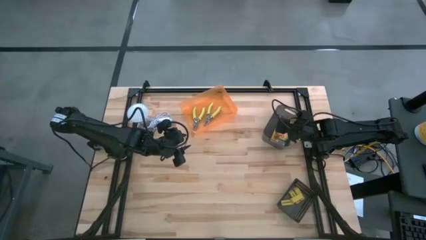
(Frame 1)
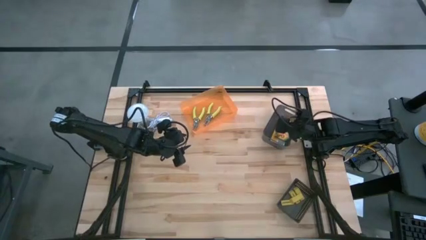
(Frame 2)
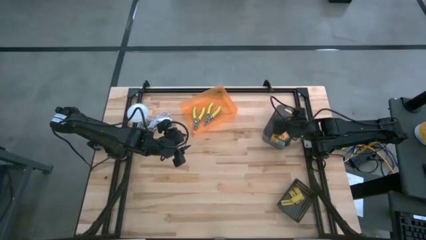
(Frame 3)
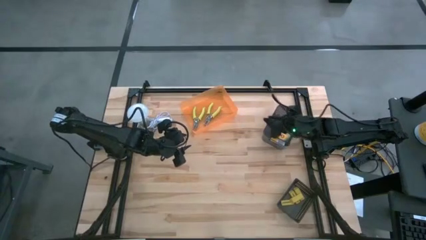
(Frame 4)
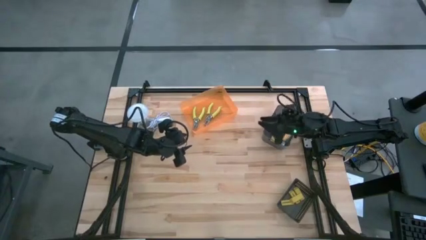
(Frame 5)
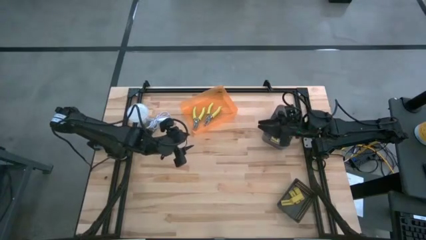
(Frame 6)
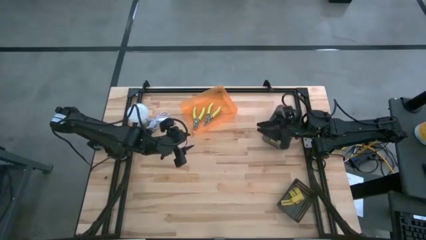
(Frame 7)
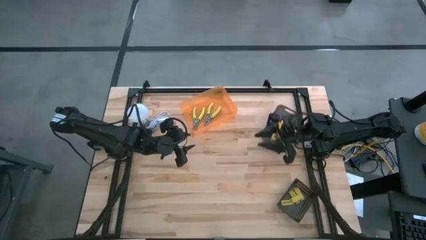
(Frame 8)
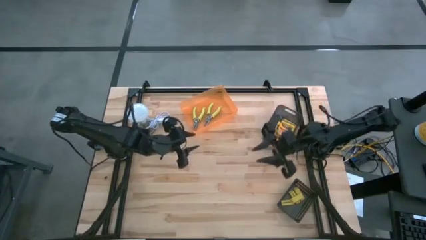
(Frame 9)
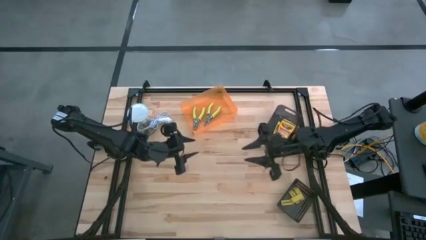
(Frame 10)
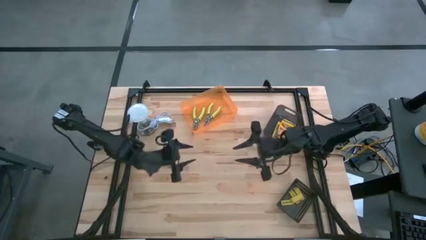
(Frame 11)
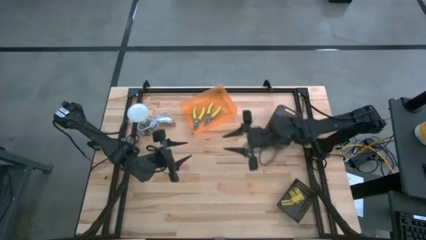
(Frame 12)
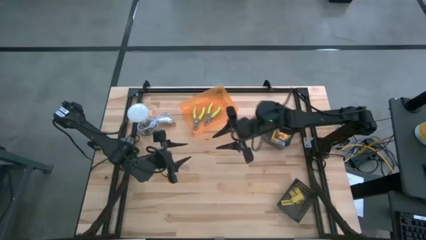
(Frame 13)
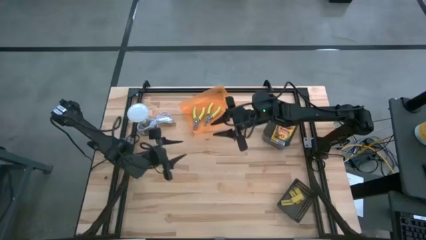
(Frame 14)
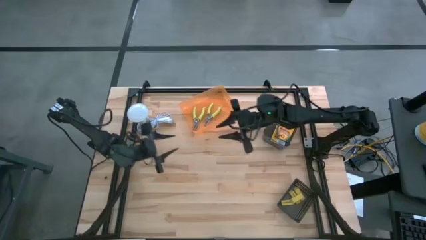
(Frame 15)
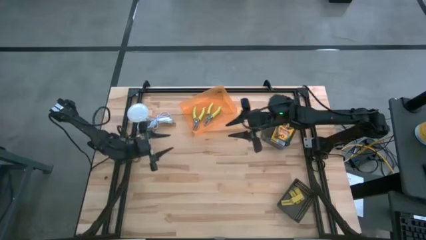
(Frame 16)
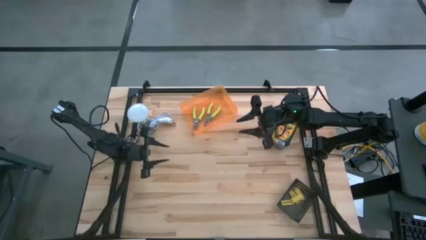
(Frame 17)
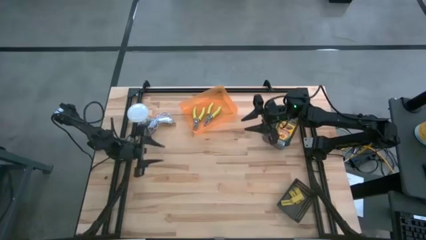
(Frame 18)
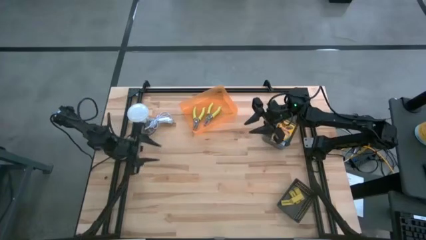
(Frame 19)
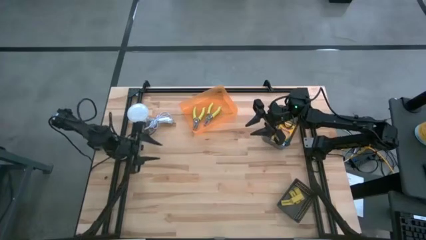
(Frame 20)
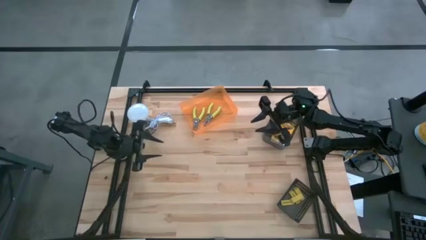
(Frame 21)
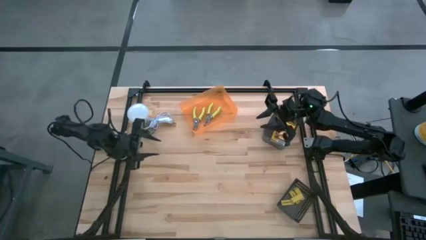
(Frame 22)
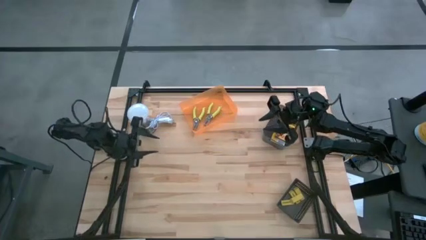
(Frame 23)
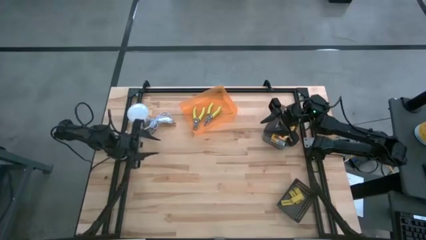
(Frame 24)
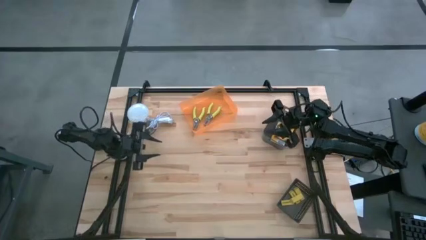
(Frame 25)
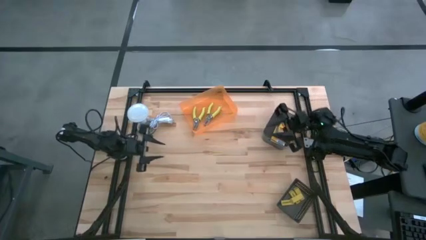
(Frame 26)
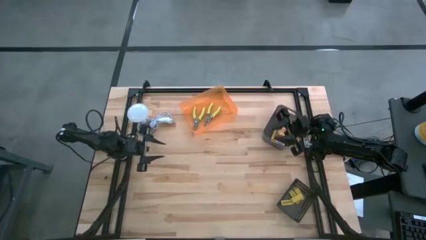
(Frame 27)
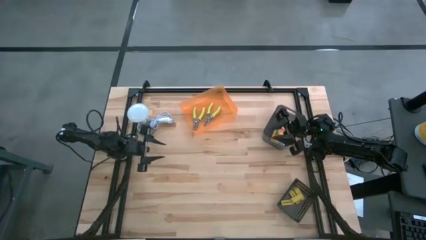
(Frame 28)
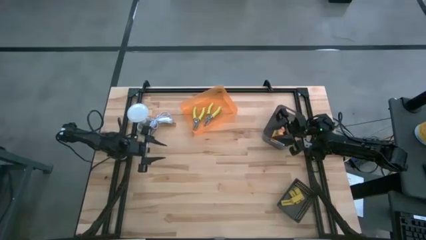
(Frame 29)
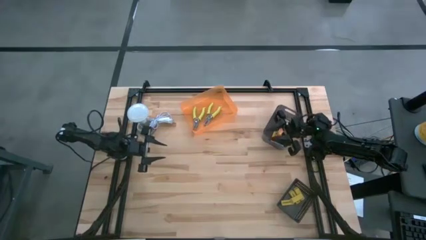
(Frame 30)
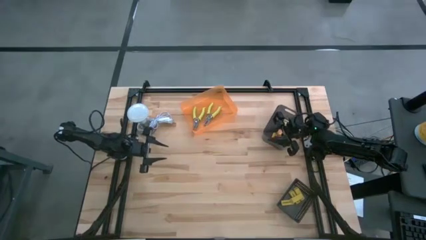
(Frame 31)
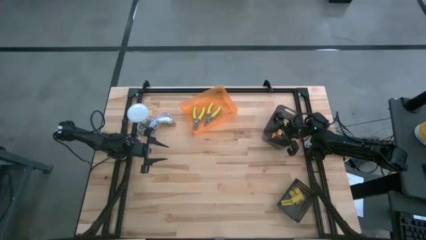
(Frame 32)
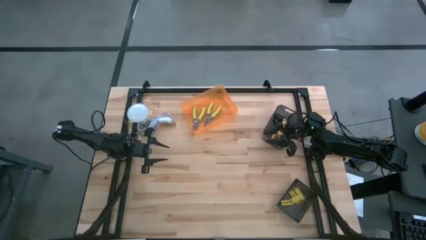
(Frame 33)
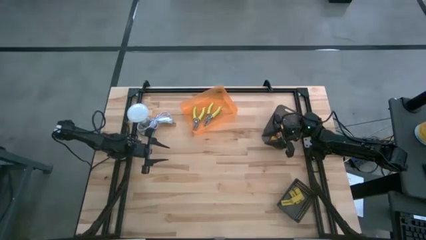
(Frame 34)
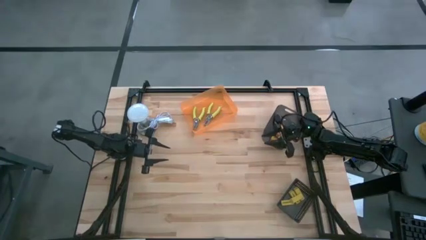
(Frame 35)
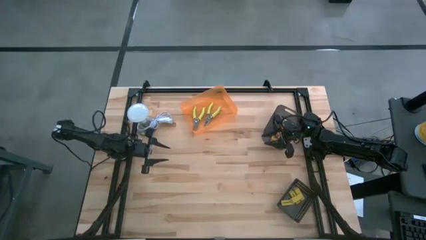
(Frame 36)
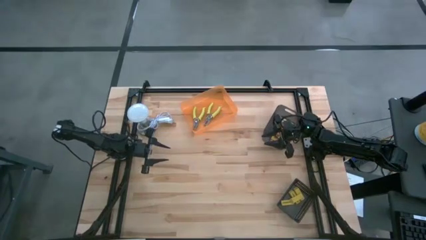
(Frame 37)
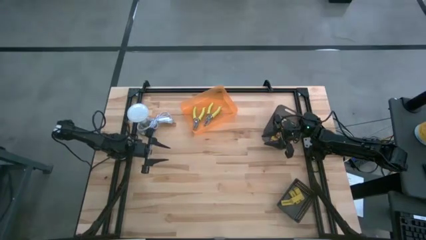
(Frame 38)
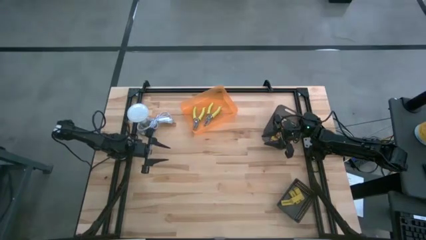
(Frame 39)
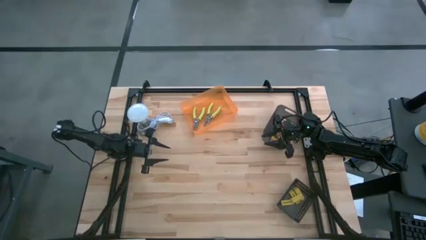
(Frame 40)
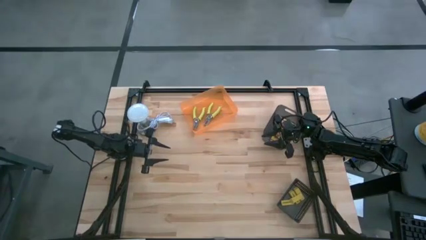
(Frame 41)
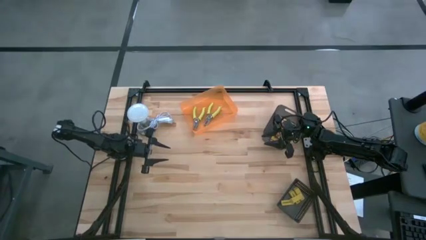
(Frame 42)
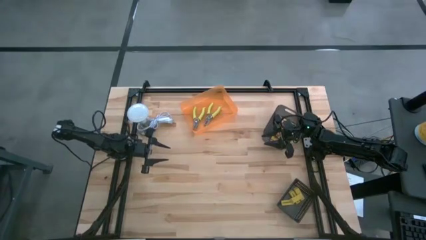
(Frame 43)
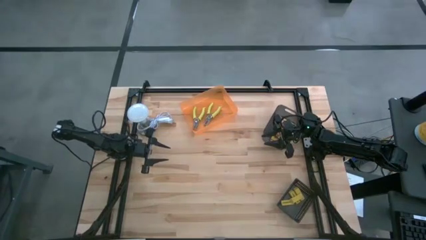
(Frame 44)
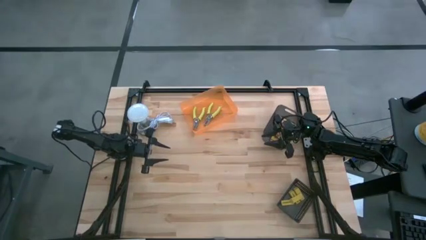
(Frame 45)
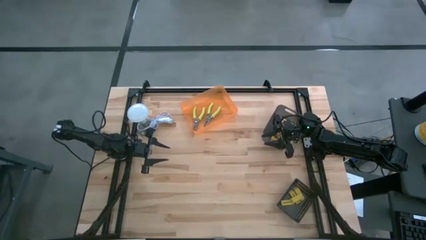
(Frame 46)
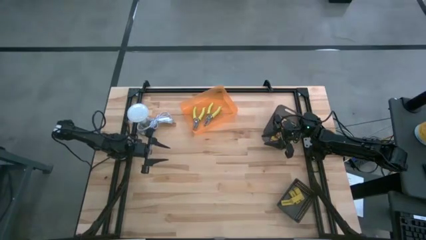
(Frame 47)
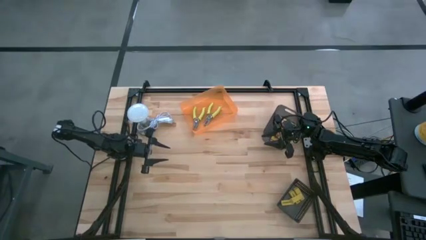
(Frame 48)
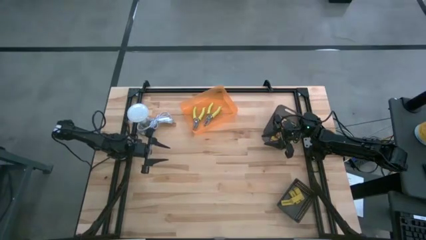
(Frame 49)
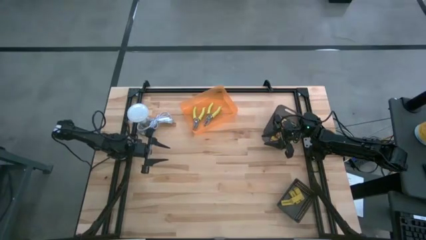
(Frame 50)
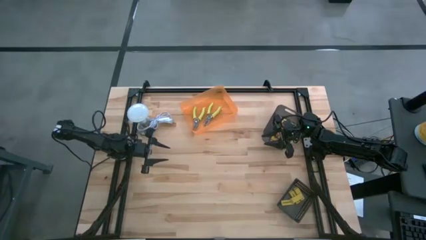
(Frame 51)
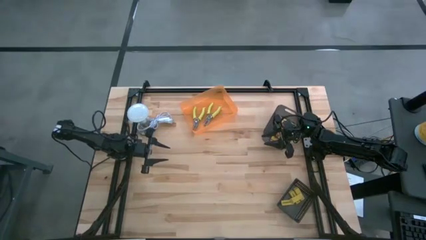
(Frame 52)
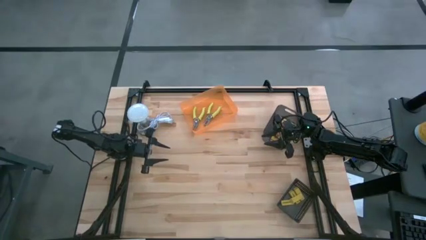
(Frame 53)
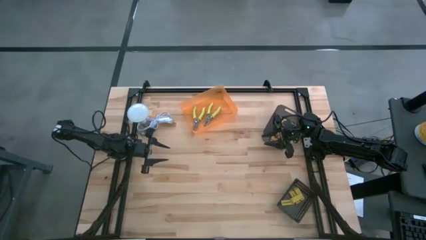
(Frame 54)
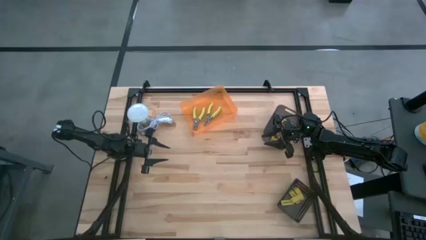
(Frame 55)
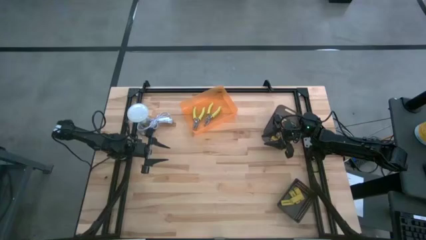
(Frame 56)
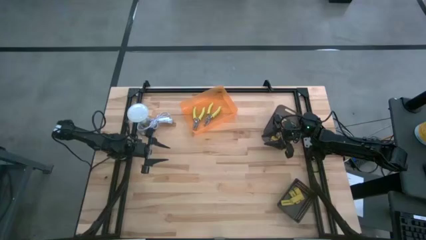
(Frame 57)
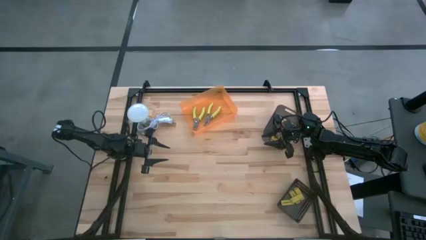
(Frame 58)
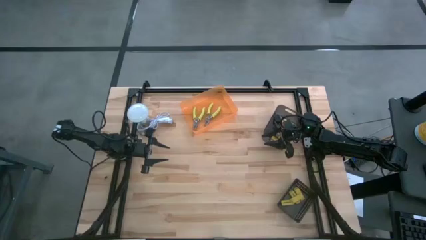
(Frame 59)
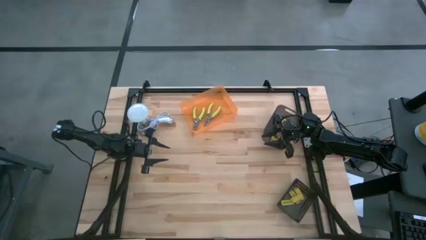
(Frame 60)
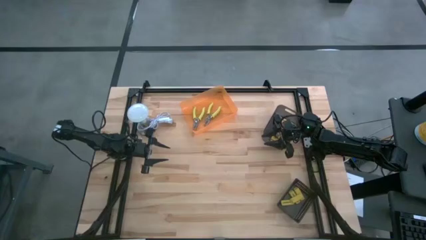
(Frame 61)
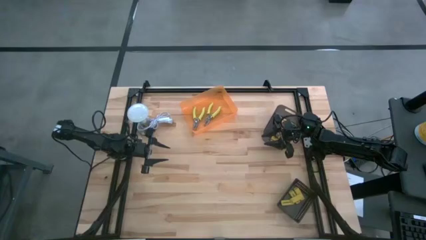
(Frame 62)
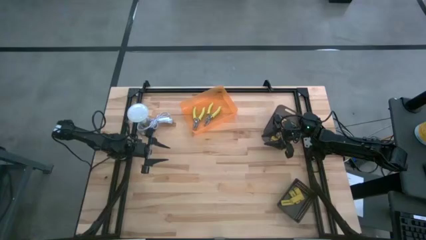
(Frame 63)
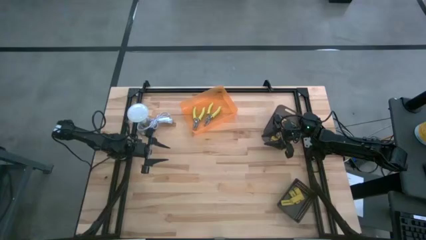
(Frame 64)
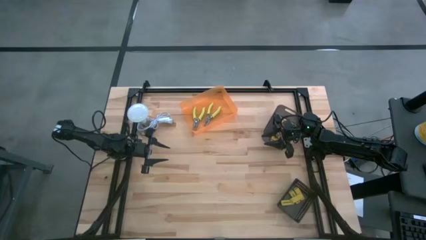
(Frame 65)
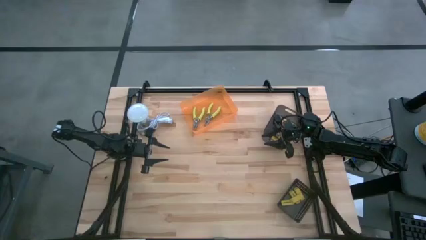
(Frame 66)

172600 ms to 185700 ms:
Task: Pick & Place School Supplies
Return to Home Position

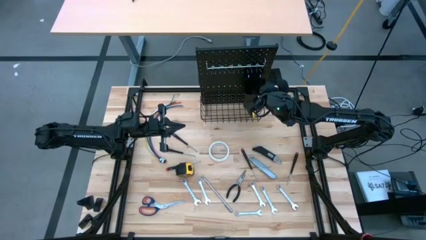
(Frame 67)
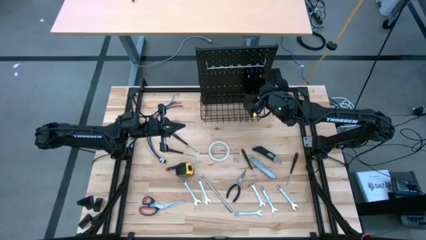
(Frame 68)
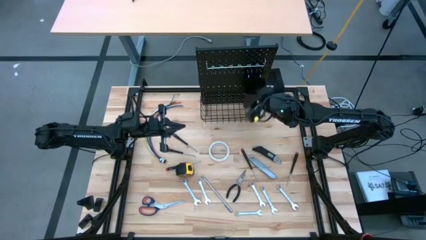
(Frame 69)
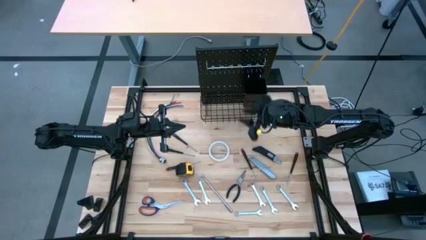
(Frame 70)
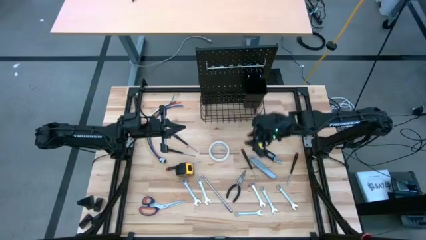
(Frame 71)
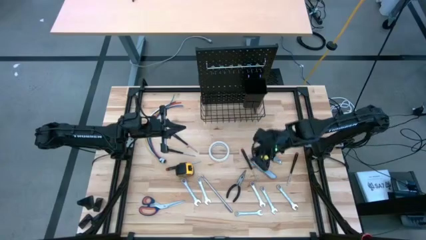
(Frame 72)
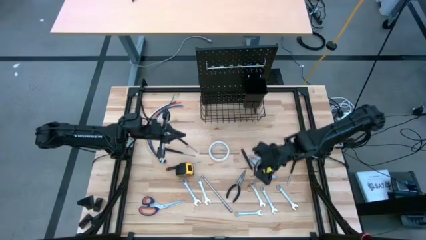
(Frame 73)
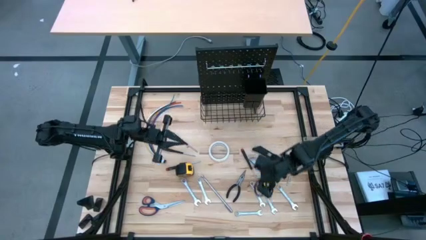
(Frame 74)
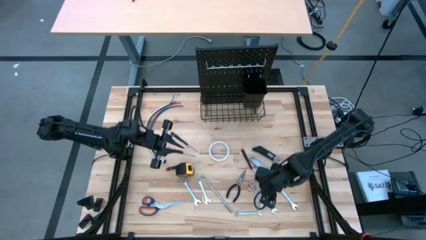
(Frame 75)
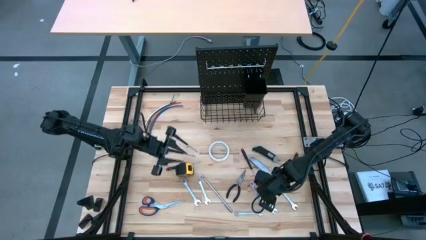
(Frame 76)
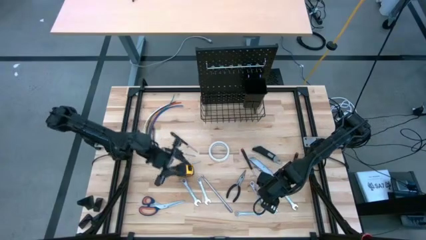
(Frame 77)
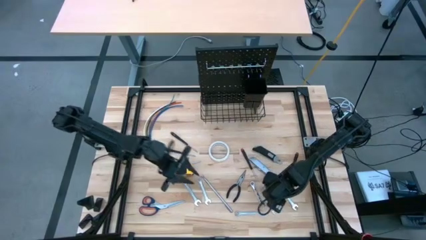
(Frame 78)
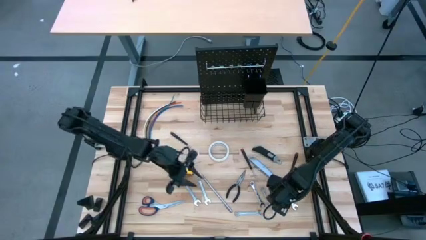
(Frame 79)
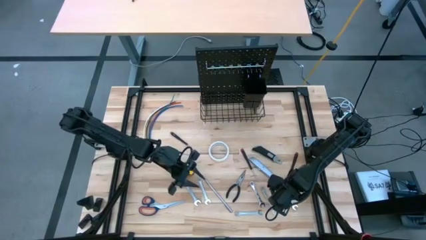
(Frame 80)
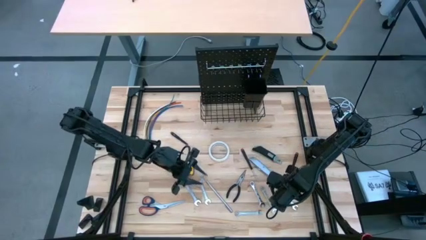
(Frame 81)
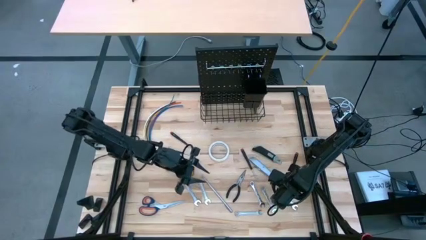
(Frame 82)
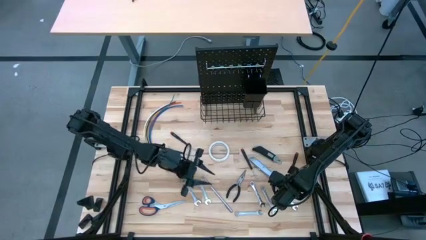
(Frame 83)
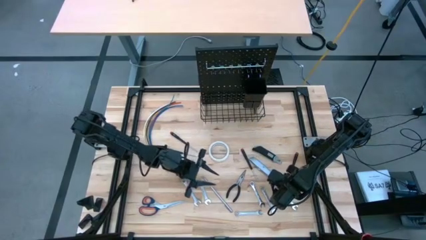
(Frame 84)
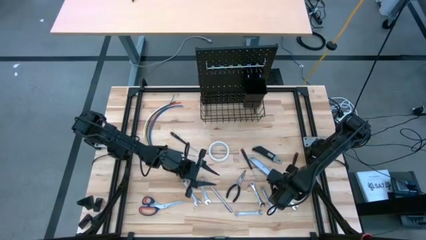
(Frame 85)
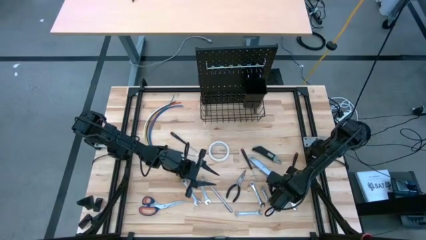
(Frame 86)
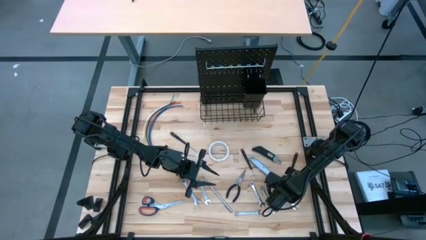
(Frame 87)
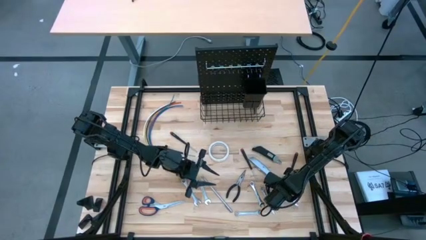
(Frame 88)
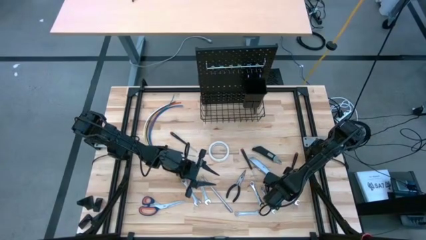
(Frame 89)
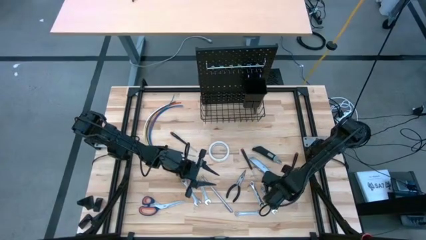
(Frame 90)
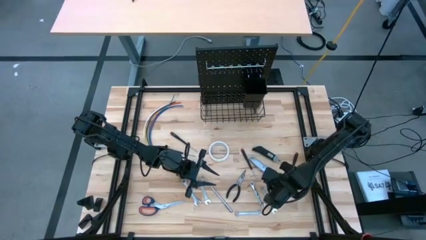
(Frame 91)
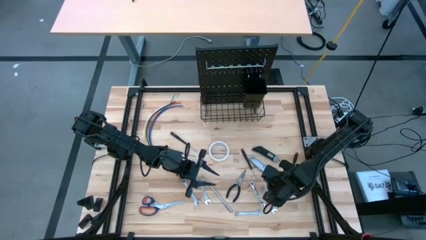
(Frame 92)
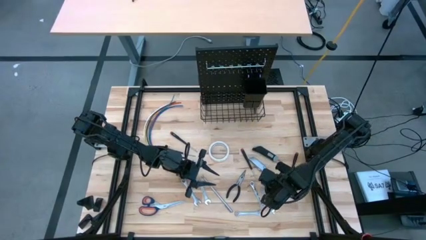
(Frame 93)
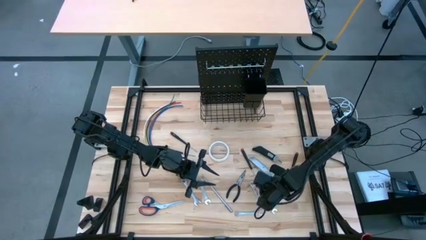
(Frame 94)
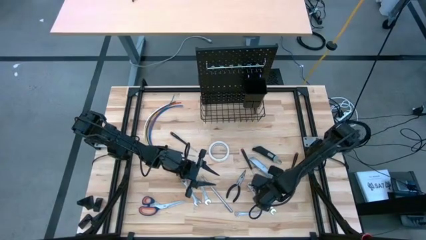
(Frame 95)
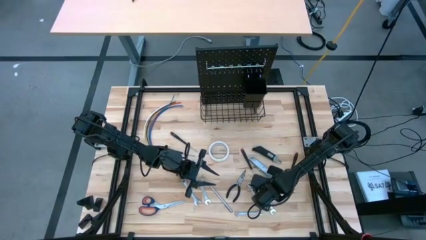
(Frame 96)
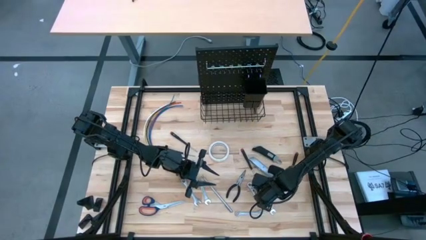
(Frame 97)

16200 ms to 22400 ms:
Task: Hang tools onto peg board
Put the wrench into the black bin on the peg board
